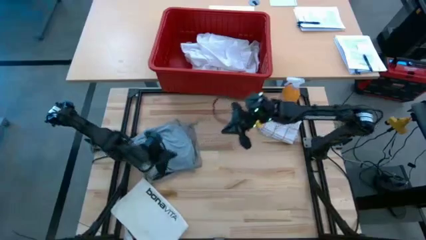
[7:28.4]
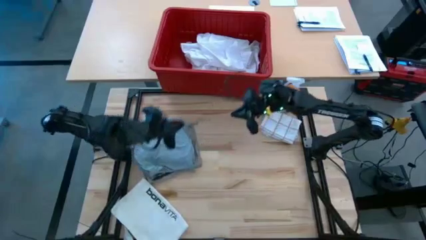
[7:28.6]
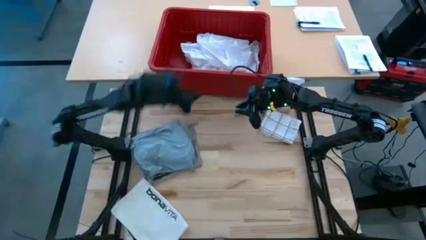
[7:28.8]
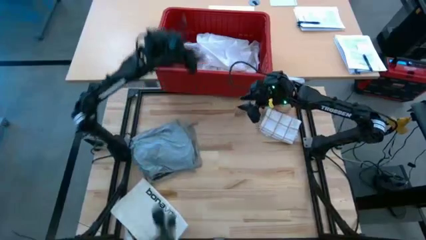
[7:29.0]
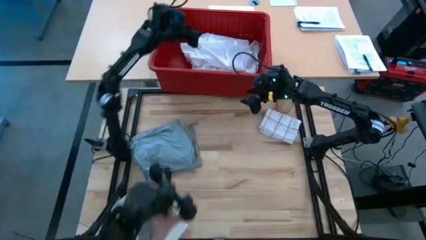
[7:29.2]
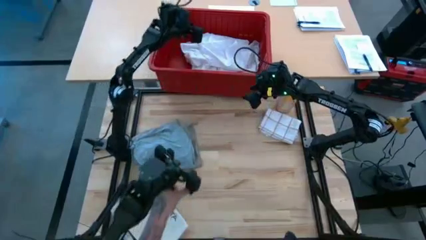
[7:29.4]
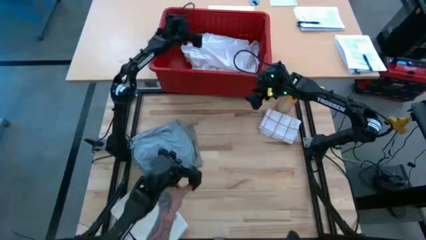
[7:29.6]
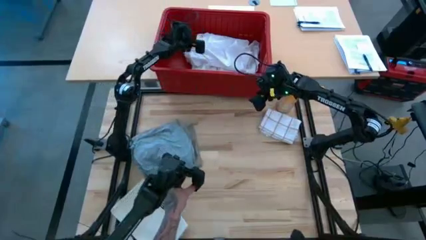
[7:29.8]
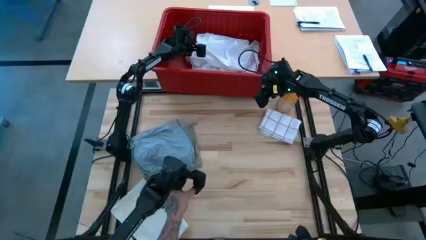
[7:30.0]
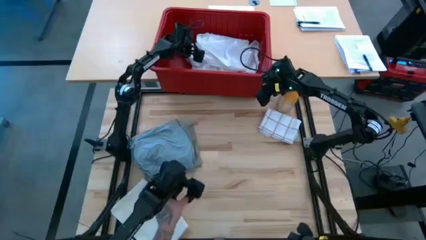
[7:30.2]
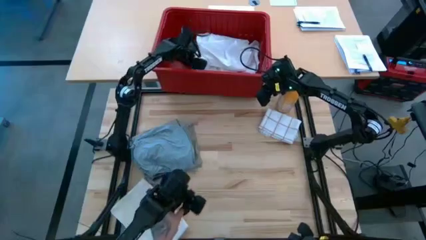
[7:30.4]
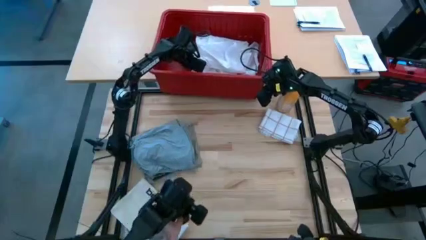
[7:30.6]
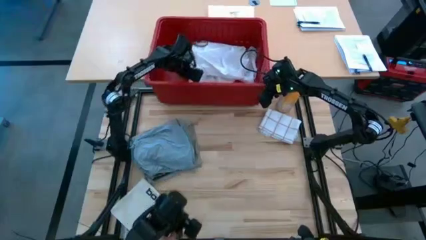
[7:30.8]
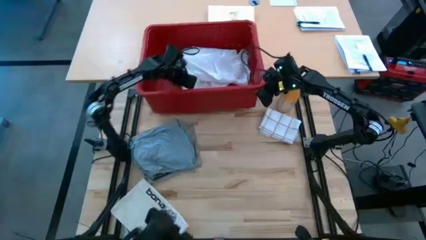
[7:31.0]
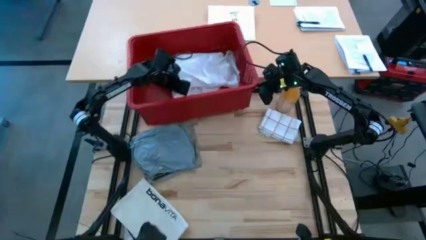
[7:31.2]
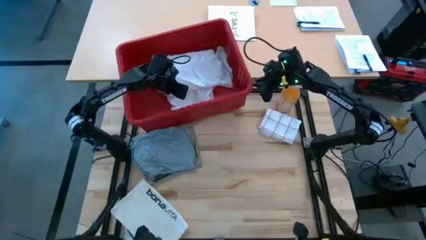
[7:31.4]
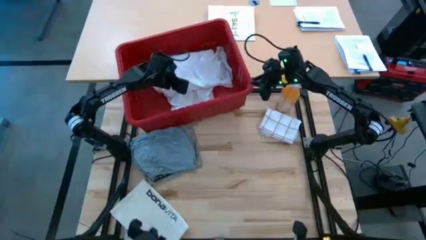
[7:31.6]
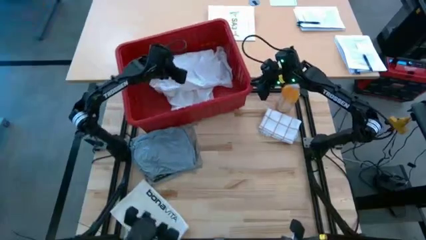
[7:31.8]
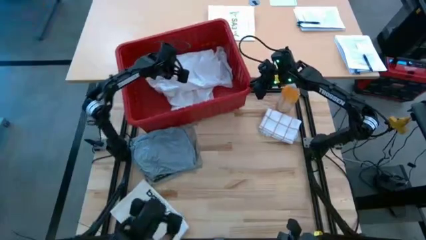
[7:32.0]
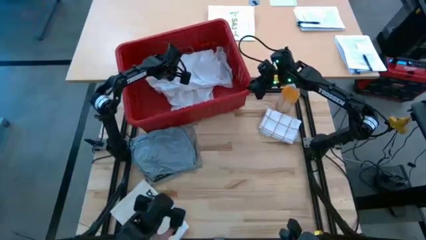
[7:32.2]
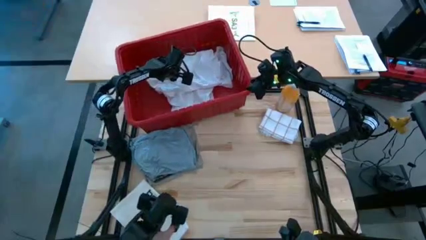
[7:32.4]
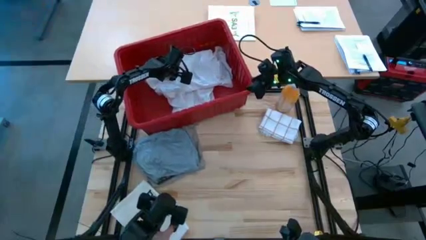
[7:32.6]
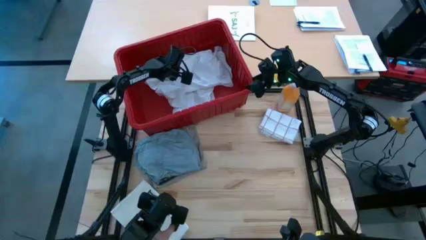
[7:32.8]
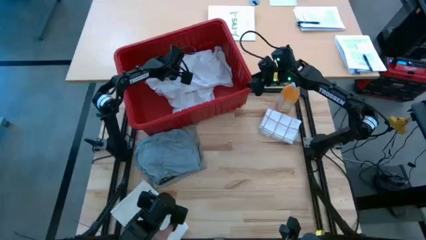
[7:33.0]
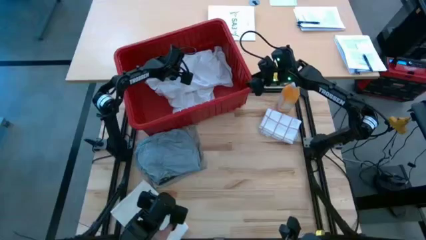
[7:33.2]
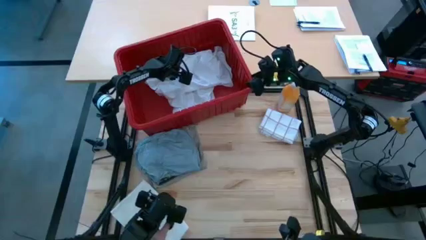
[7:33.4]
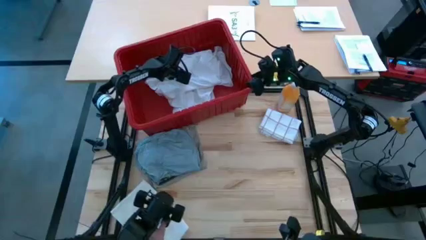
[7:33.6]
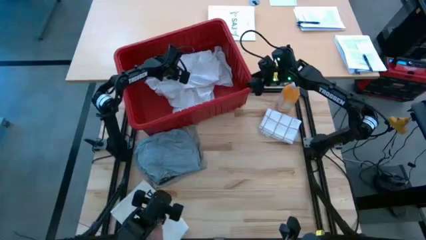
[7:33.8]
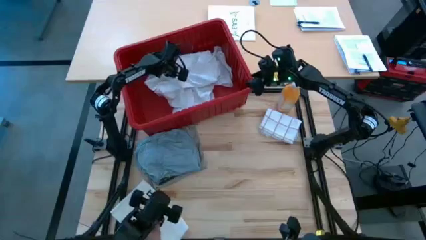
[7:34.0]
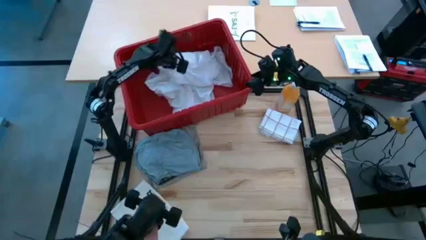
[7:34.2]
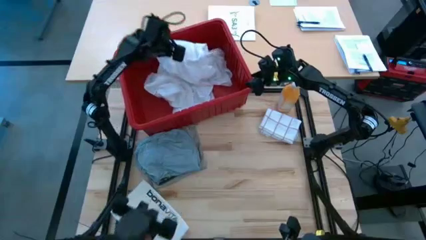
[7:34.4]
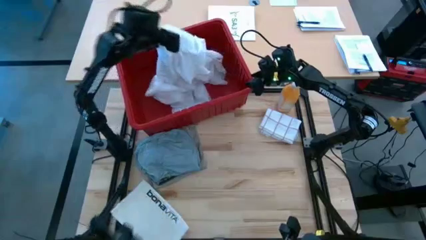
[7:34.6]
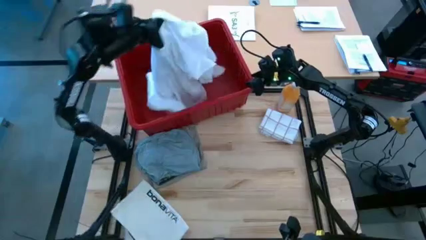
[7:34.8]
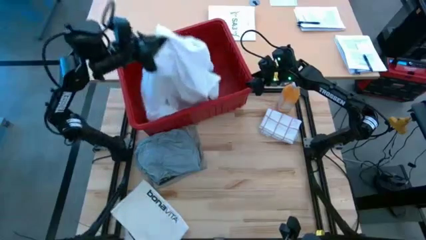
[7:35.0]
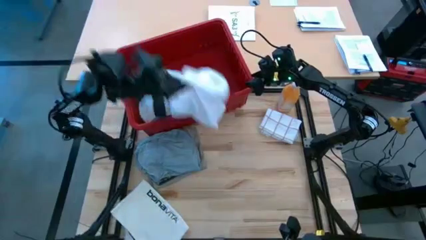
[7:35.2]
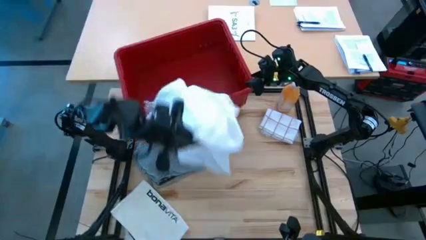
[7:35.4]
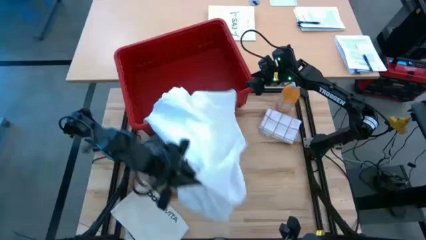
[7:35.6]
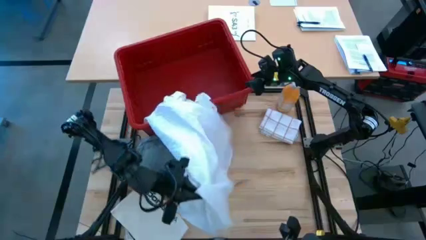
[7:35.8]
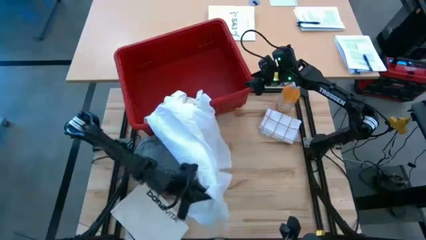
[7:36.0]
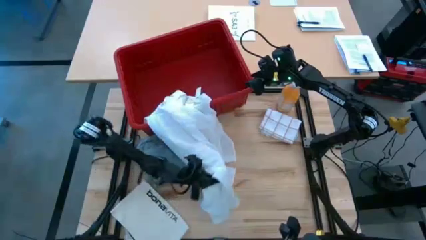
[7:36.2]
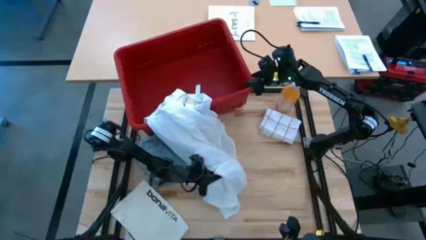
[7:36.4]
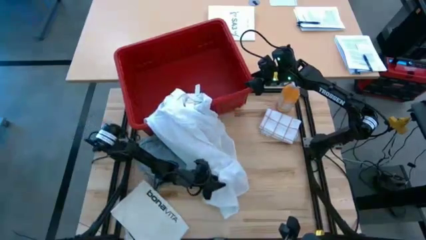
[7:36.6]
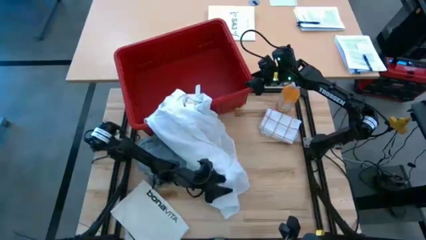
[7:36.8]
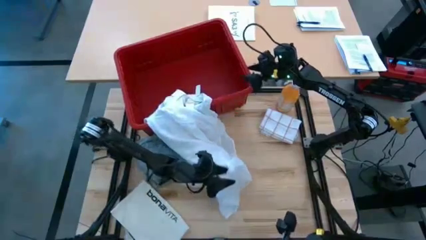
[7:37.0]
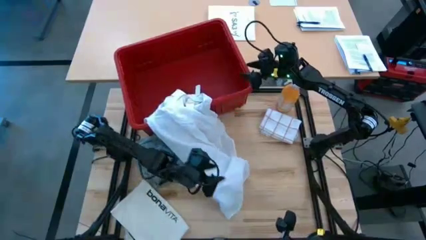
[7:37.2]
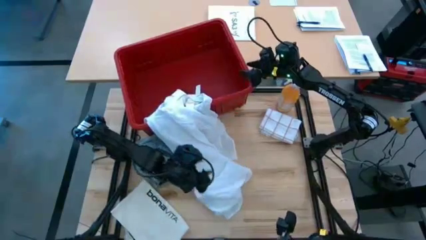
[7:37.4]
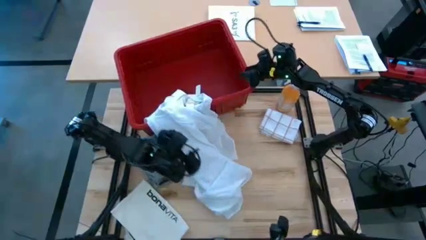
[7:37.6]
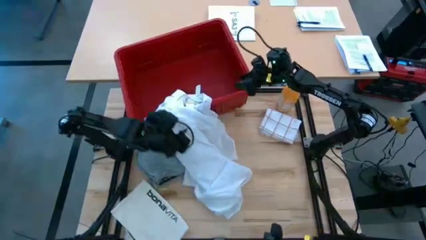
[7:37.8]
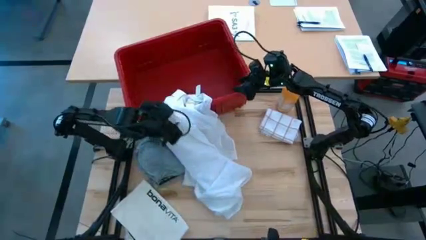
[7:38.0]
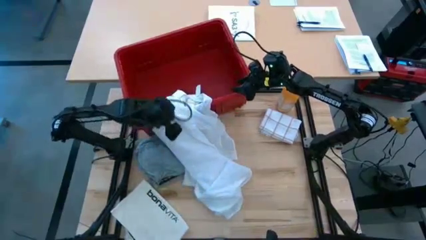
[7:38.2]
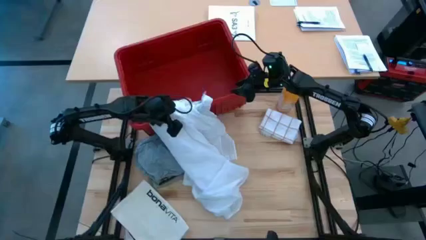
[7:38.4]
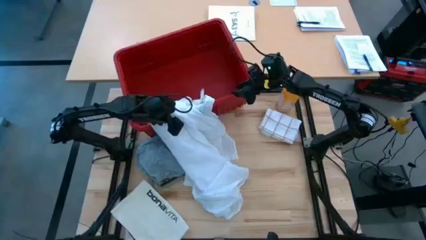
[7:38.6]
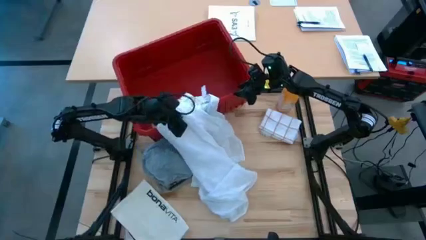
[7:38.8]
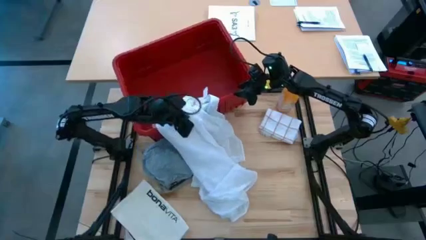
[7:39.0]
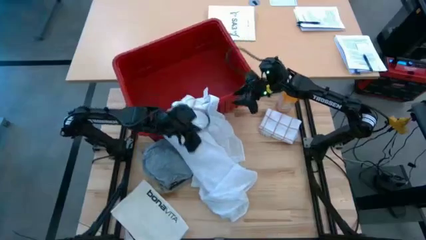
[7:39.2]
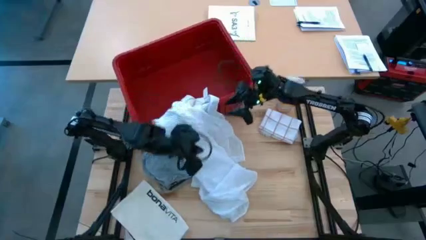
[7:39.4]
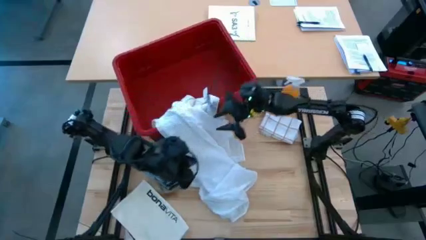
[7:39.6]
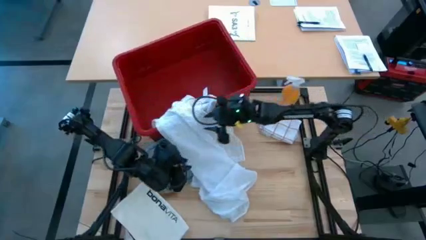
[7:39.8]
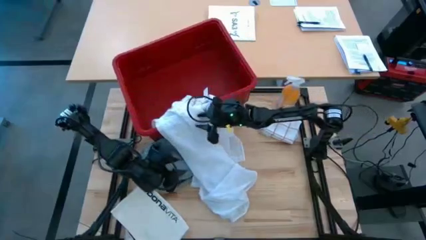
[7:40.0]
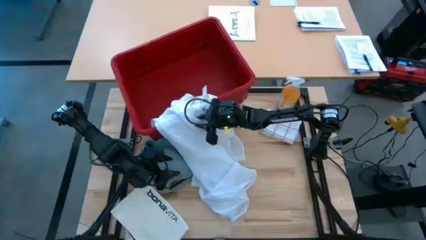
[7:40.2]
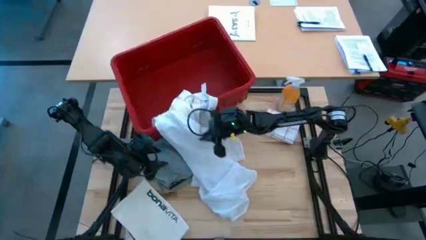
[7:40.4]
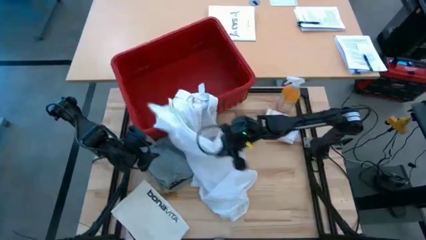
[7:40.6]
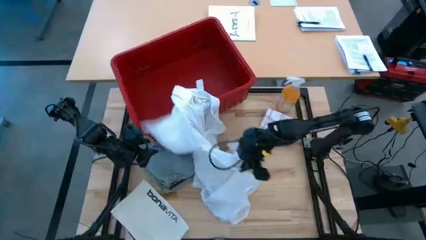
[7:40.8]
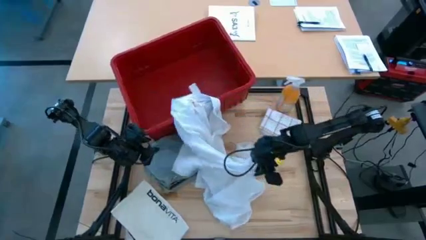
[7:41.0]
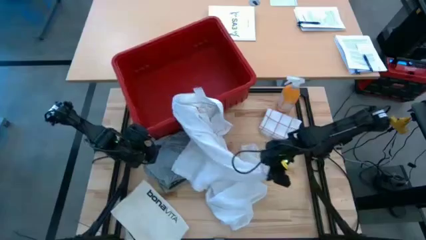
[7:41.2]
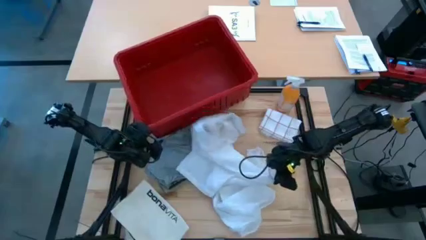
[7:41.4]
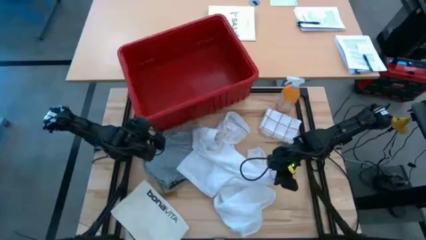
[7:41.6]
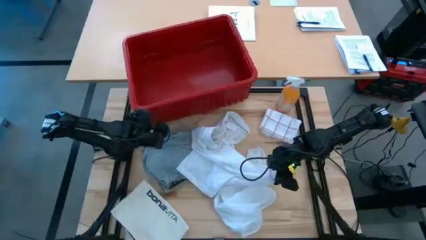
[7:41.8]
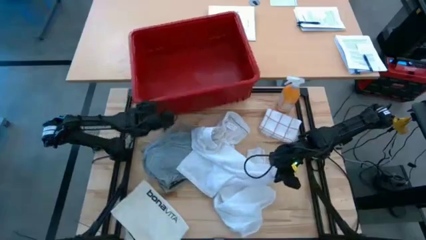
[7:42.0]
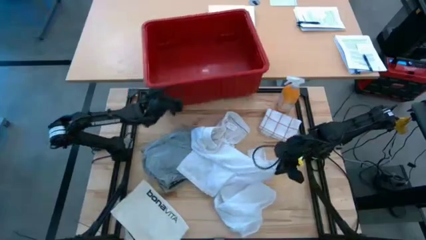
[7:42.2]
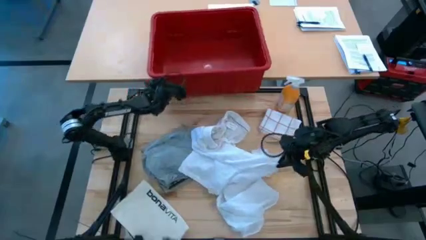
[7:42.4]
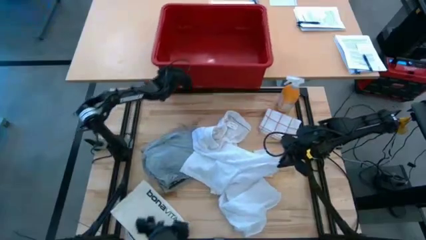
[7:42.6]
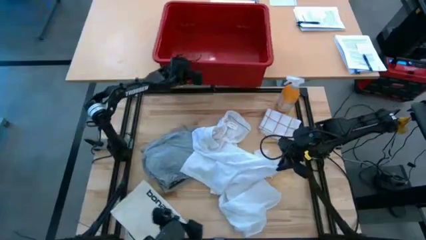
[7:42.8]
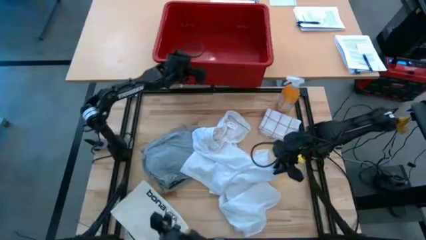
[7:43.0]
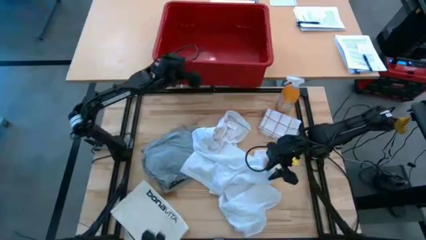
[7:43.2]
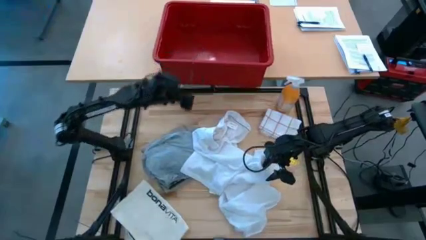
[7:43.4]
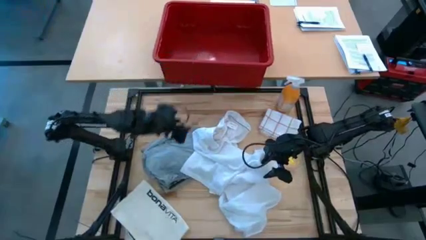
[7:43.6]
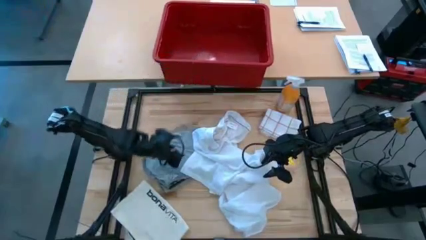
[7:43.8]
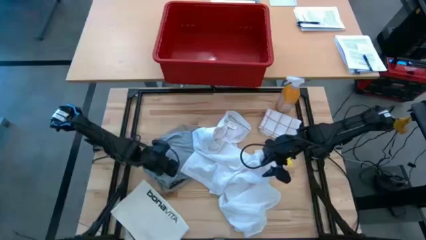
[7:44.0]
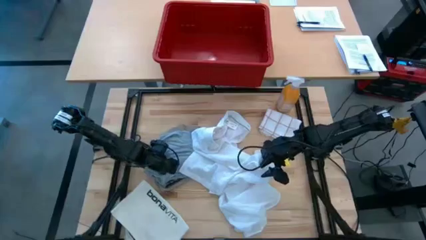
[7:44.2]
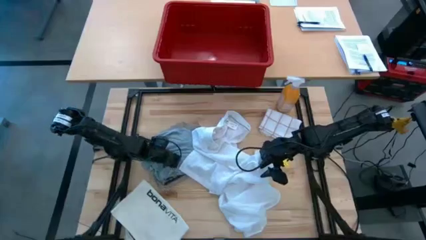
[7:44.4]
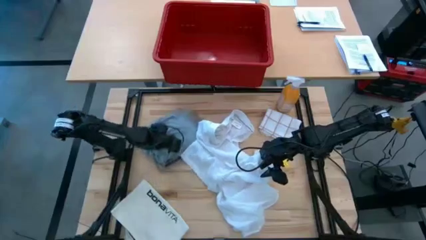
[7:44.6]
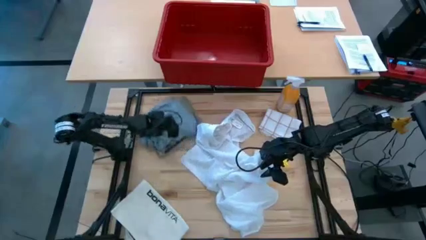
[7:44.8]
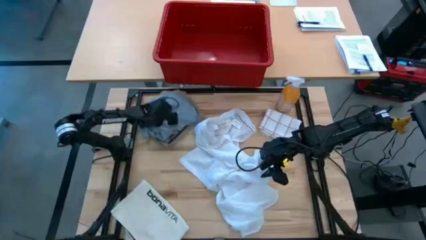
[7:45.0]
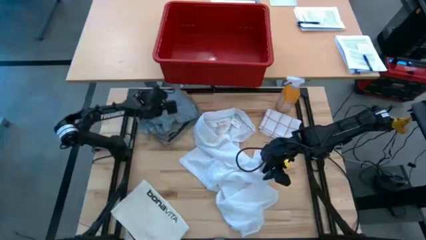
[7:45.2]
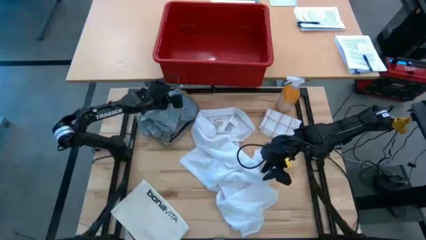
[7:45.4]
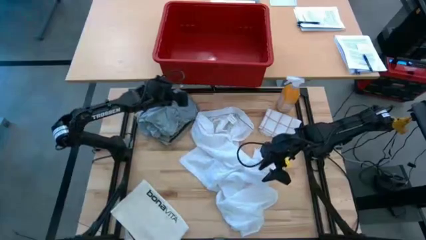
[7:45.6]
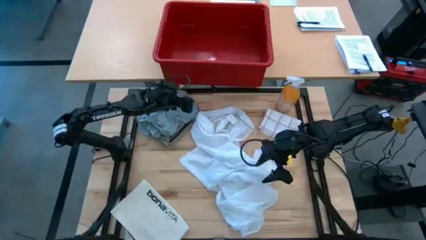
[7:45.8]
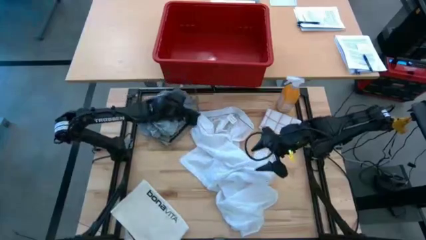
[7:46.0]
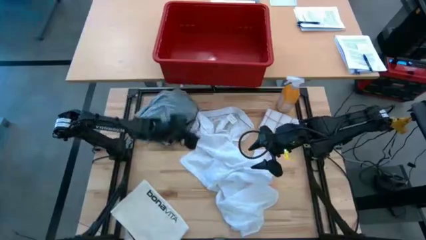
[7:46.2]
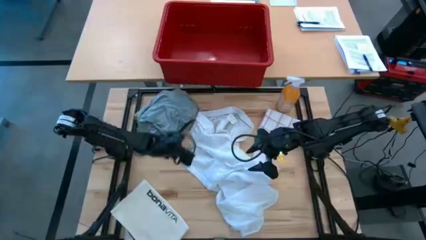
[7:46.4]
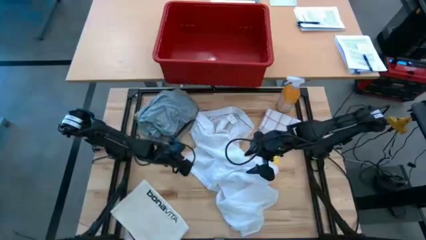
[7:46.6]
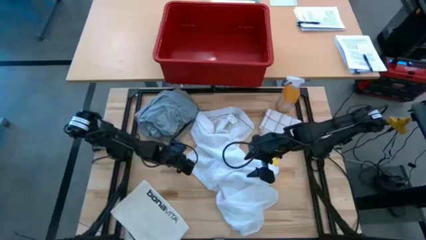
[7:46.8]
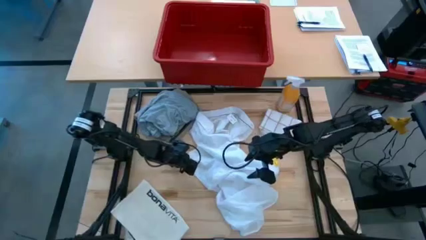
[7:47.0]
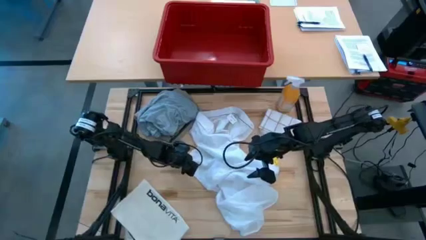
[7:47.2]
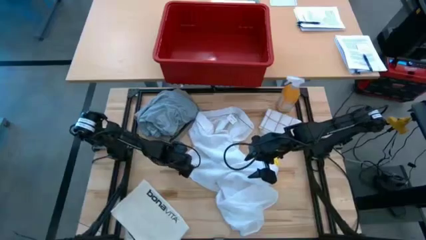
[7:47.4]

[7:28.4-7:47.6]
Task: Fold laundry
Fold the white long sleeve shirt
